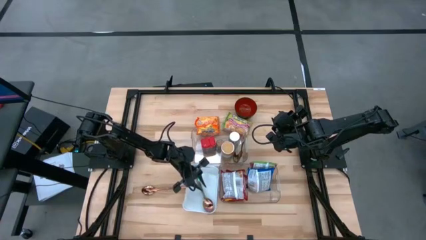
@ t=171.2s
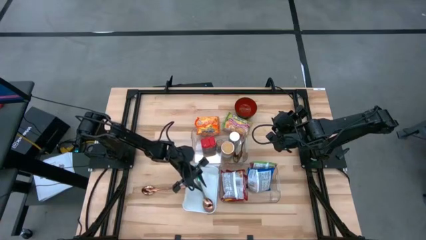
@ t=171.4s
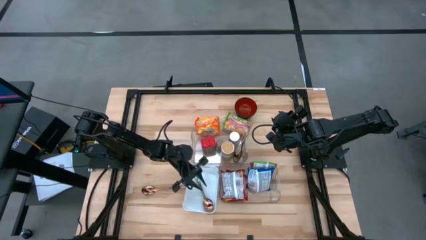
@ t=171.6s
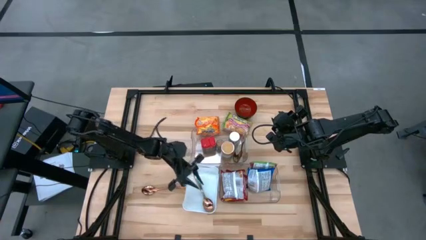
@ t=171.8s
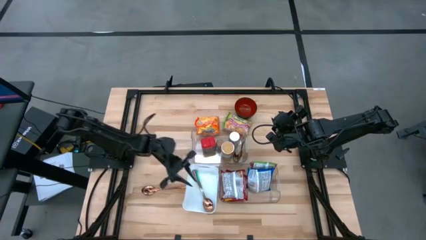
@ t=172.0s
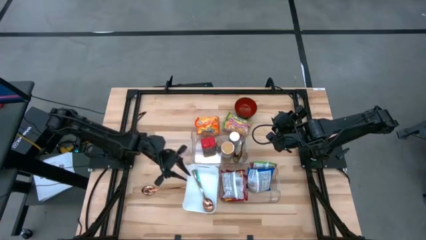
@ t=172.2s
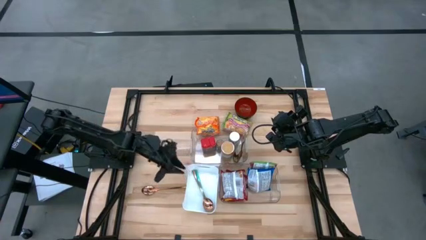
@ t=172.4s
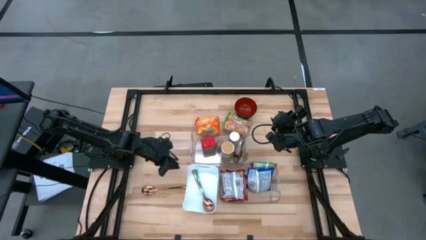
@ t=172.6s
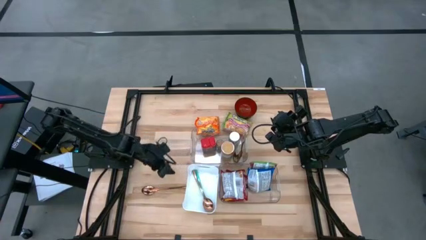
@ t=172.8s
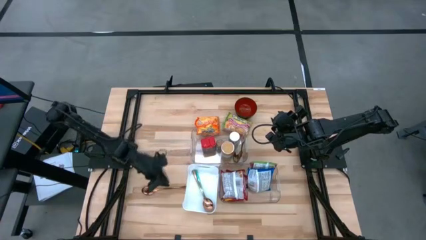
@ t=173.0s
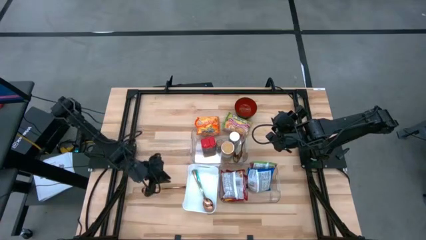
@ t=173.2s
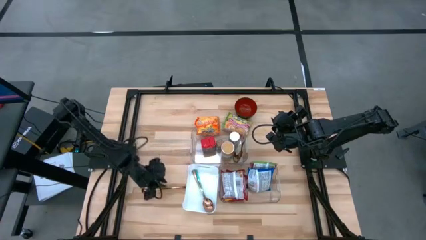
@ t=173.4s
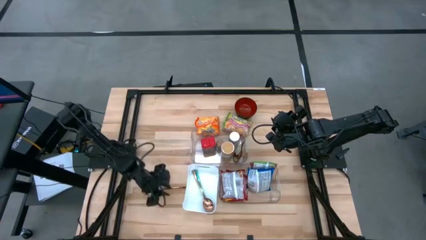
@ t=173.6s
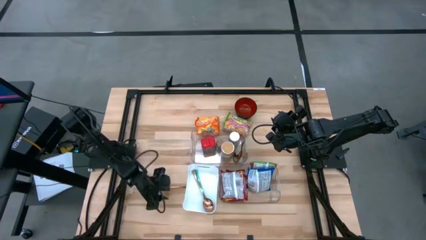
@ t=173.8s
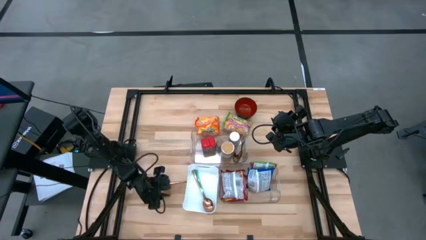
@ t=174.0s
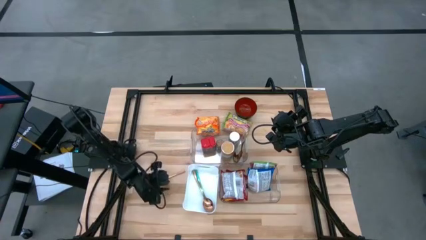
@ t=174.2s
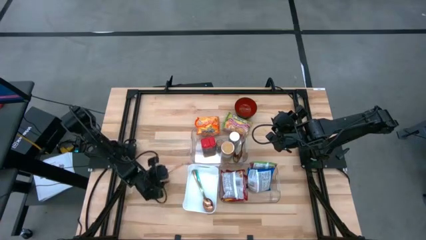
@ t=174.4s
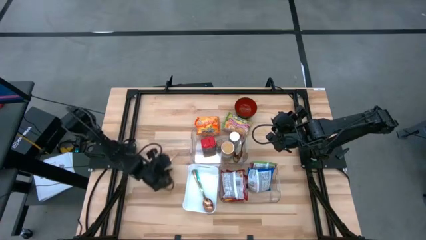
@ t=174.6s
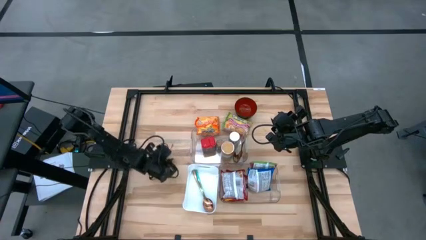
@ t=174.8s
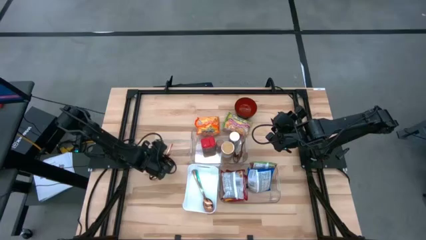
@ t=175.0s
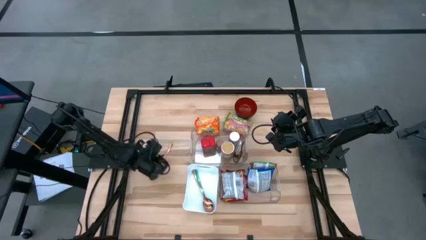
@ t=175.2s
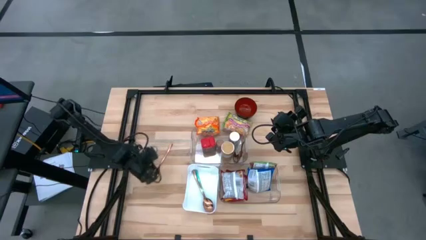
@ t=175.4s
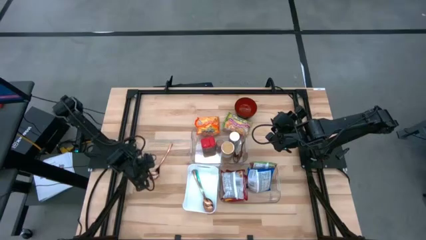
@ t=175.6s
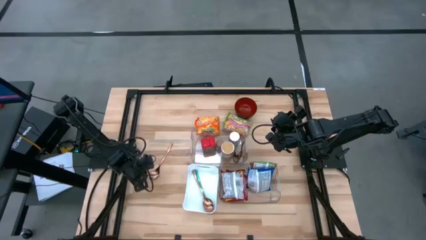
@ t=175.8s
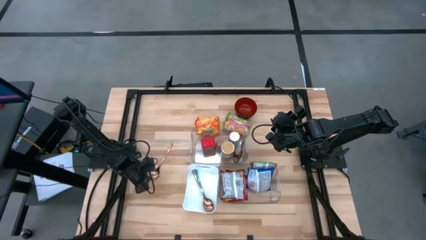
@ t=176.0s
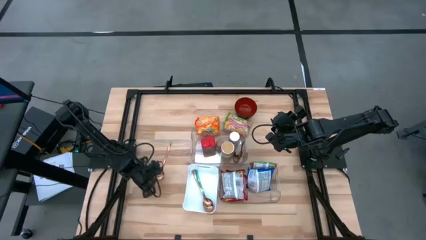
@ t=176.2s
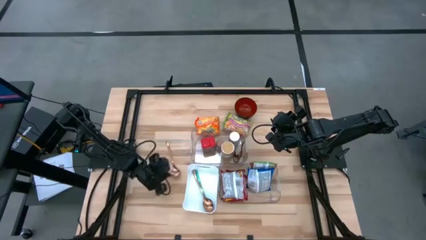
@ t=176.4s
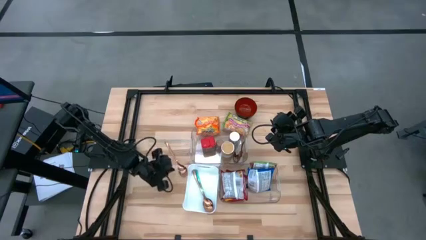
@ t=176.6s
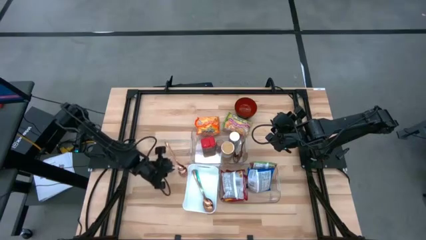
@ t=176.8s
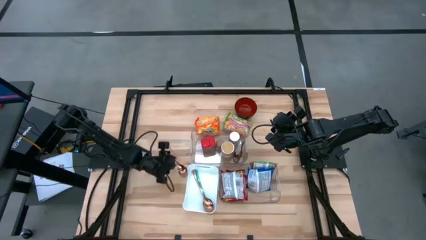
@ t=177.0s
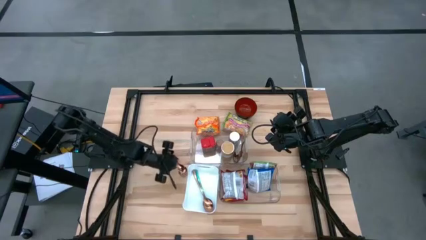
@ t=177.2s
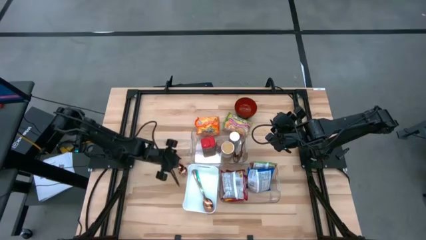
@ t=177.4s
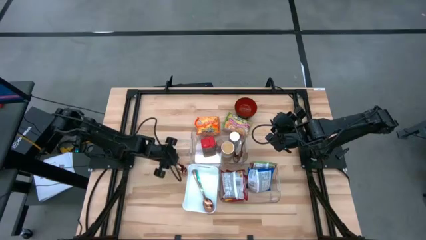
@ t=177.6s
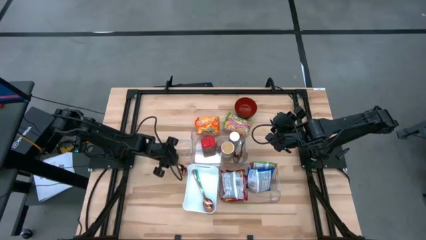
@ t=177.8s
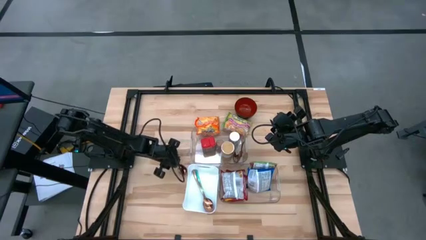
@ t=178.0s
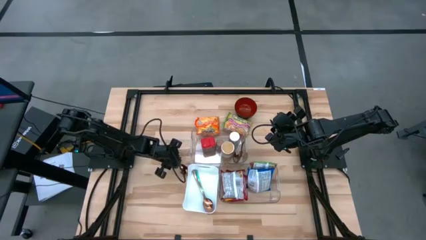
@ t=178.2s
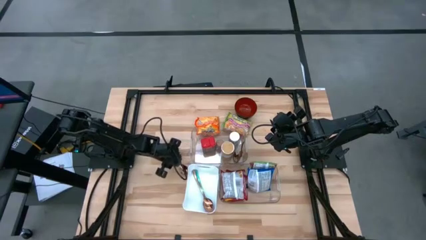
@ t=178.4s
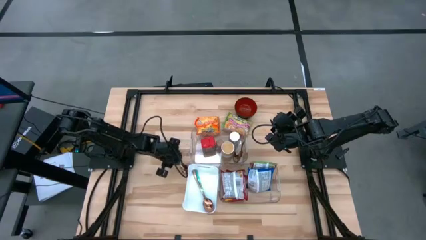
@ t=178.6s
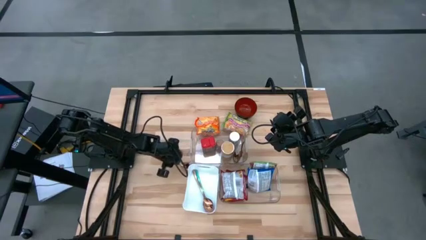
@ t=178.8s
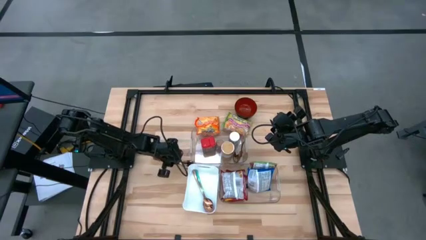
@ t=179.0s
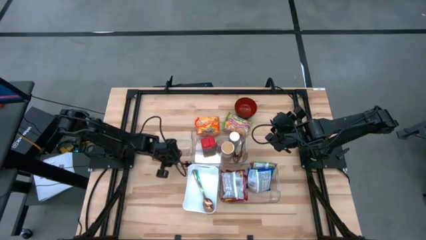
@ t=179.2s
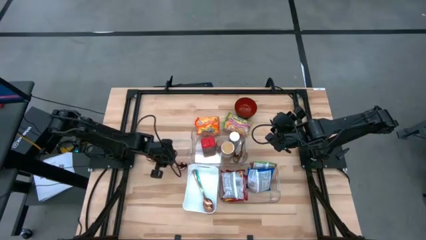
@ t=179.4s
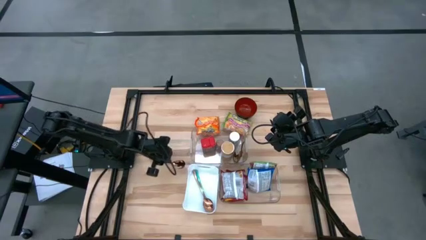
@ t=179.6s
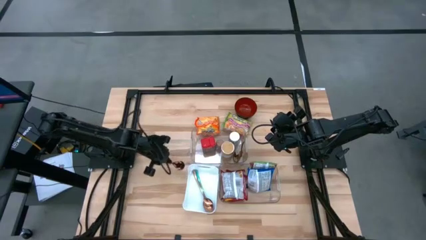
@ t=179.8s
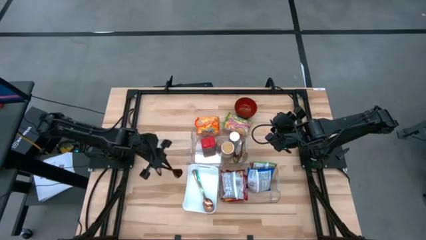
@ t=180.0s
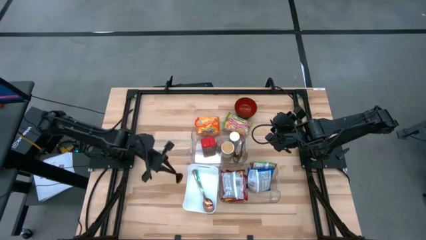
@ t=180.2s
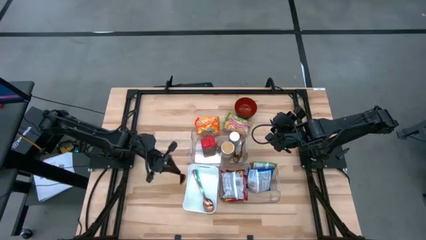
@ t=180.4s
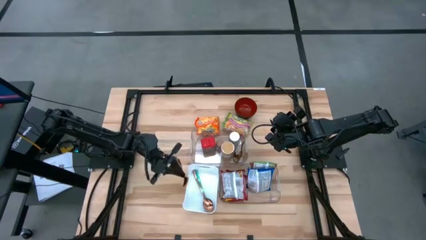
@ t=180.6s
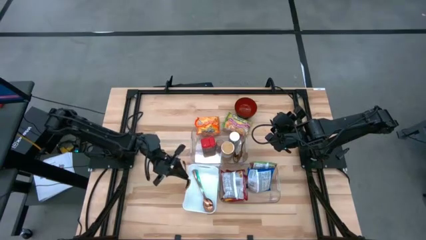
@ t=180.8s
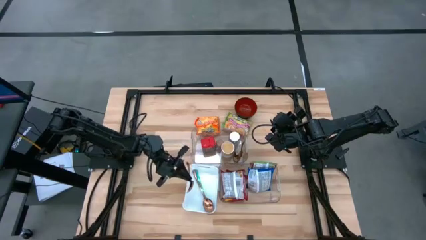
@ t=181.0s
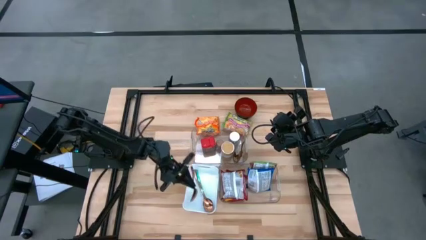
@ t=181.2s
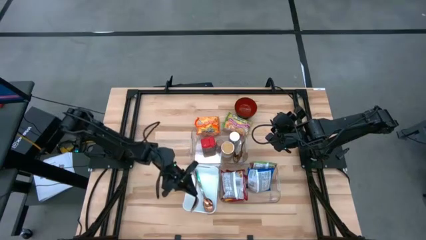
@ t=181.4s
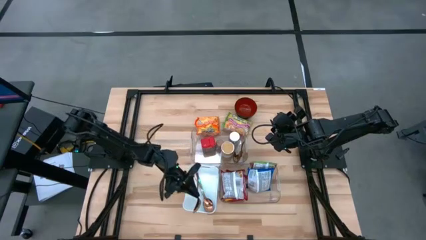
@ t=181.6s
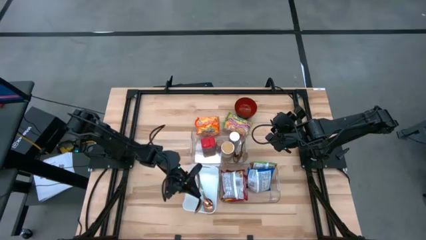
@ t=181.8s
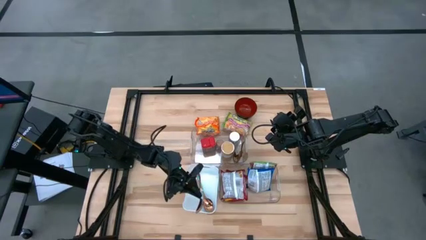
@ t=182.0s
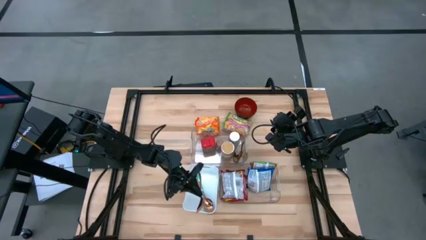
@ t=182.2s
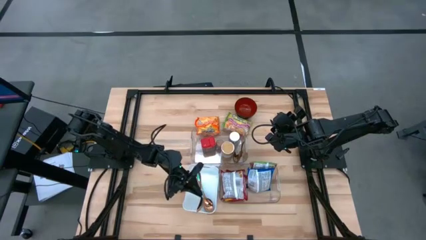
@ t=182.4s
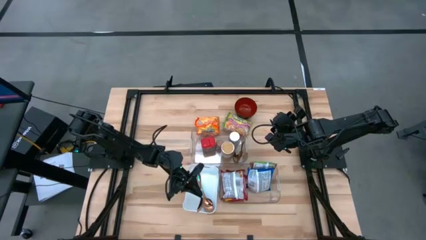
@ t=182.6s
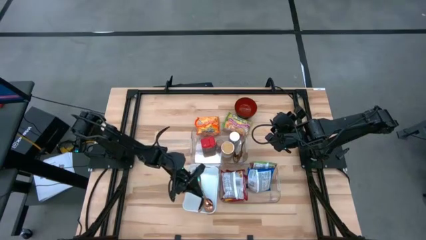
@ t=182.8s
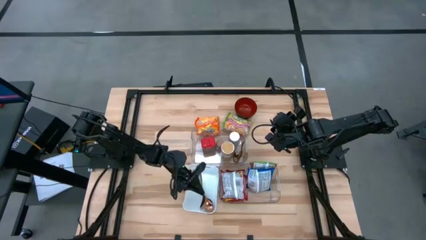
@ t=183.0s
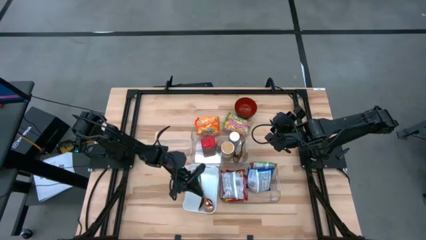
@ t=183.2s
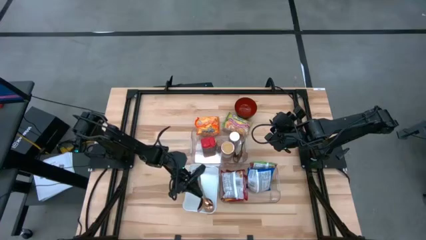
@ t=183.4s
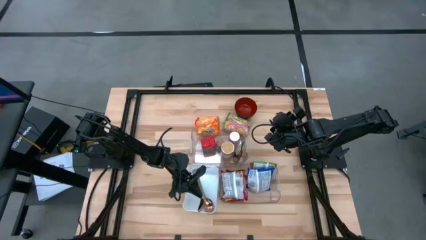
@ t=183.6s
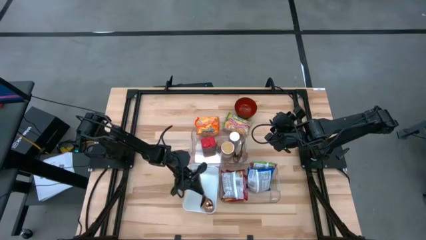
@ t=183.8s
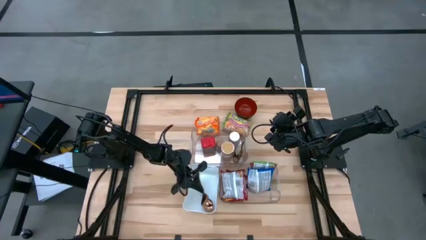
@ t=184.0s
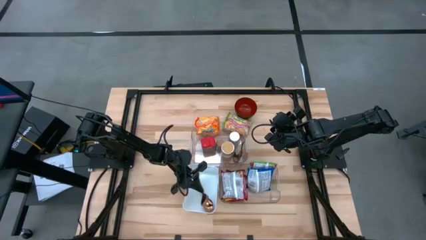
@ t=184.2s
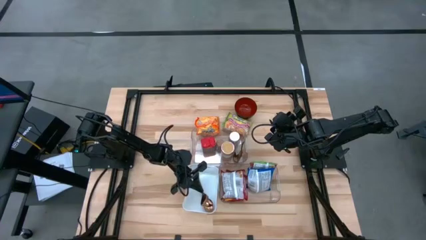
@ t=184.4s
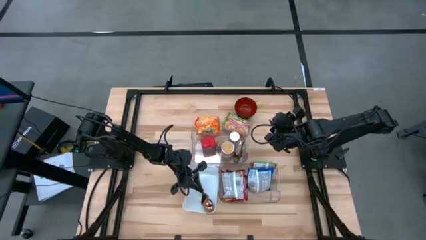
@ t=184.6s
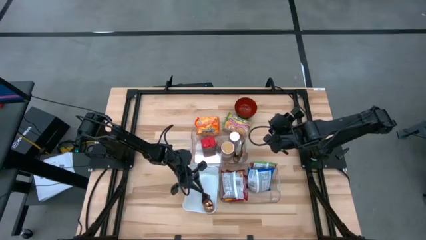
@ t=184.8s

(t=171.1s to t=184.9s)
Task: Pick & Place Food Item
Put the gold spoon into the white bin
